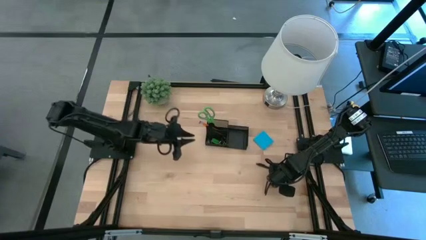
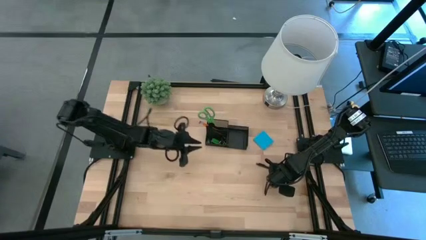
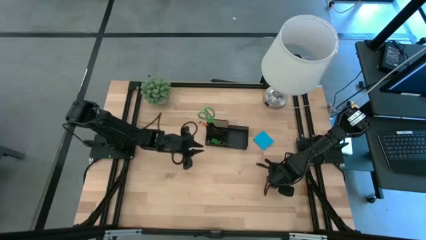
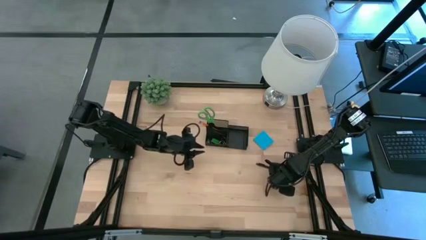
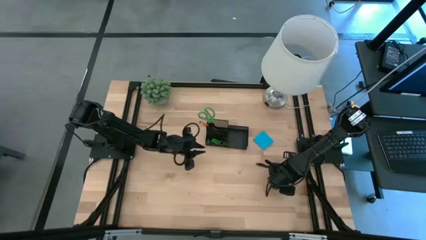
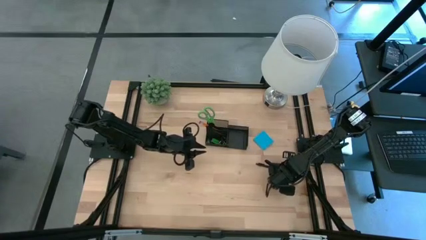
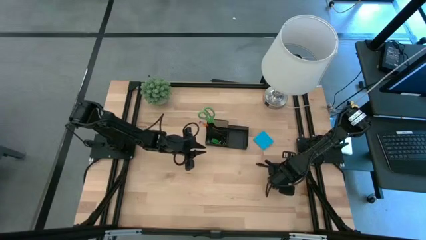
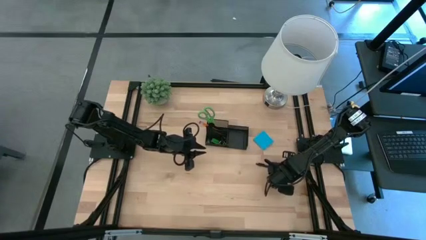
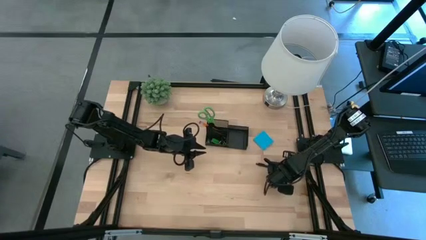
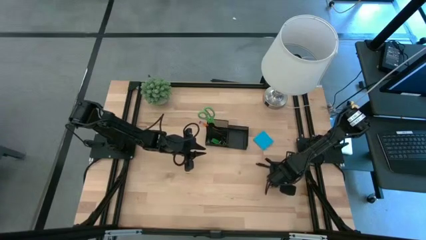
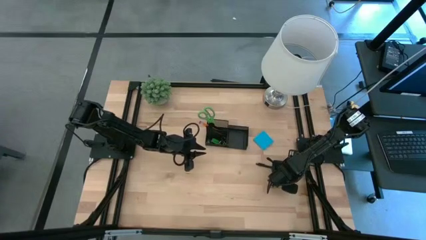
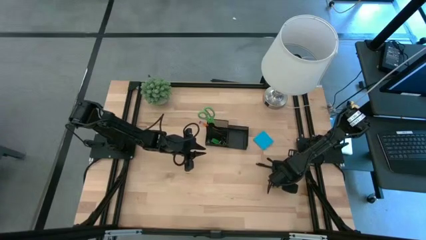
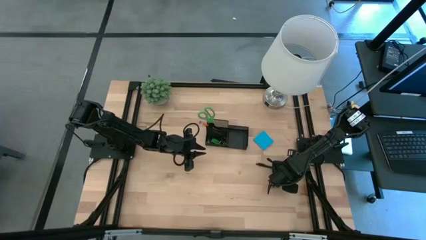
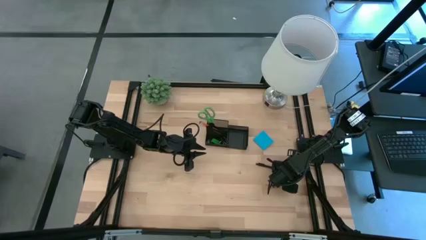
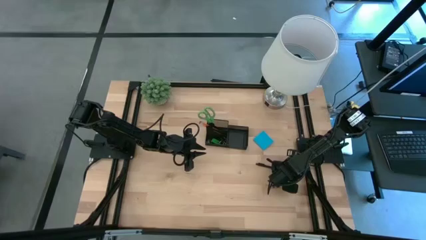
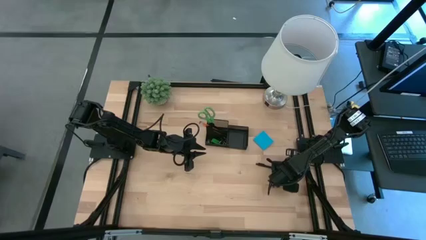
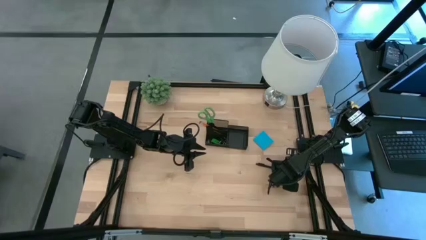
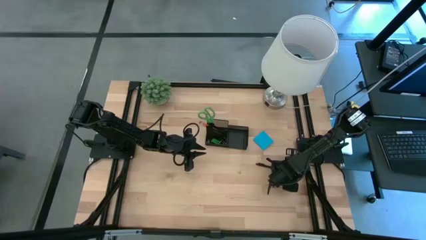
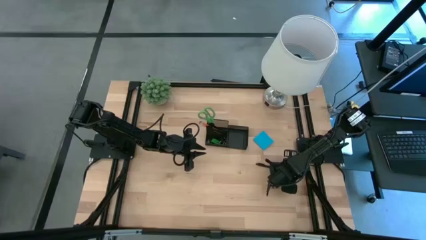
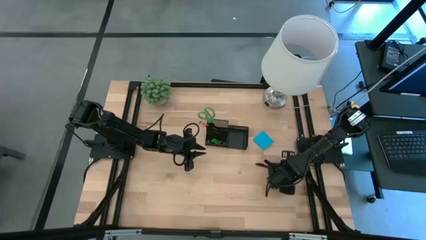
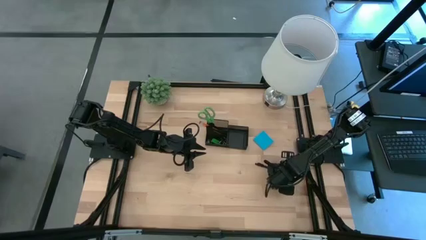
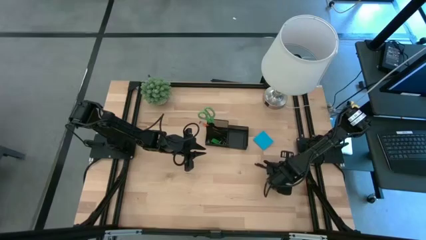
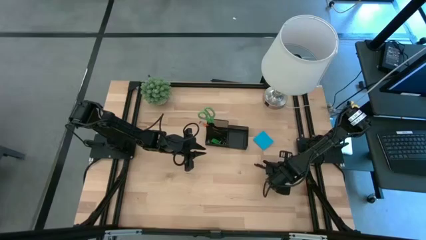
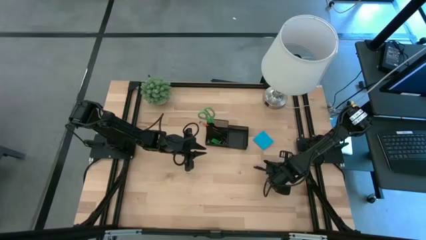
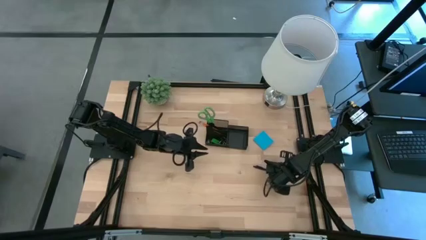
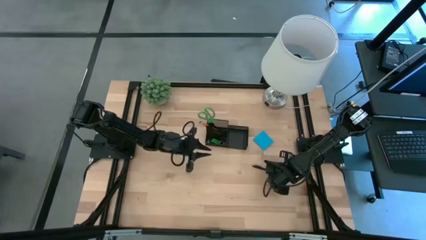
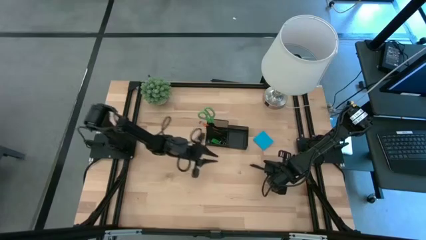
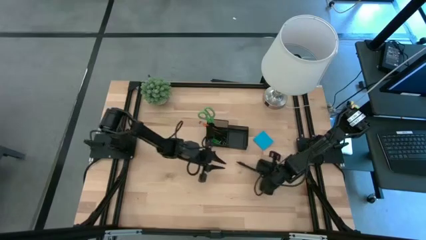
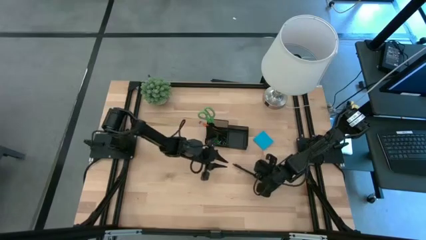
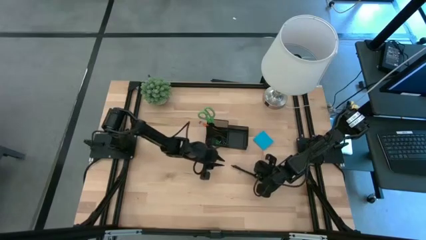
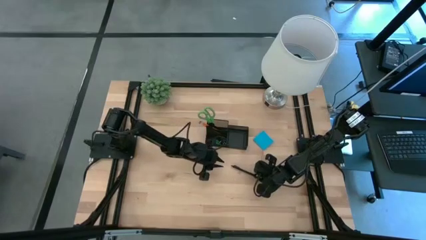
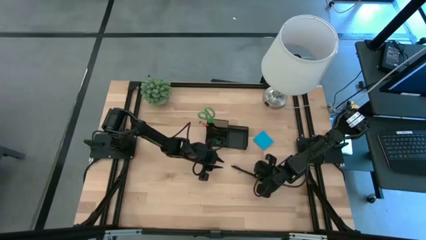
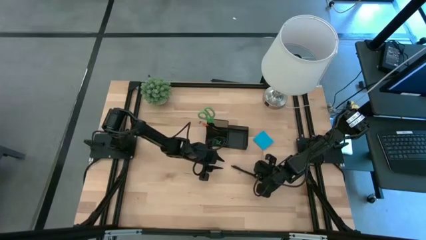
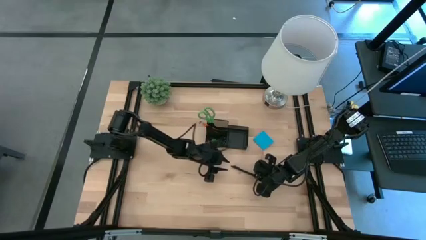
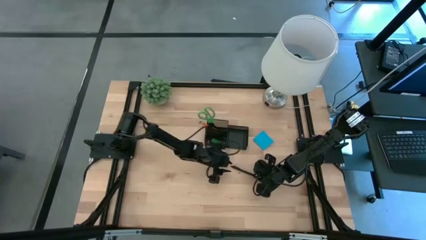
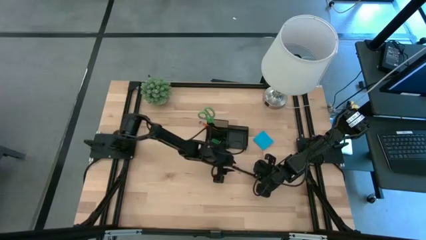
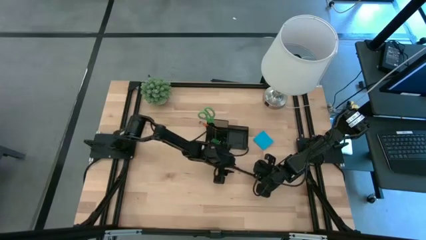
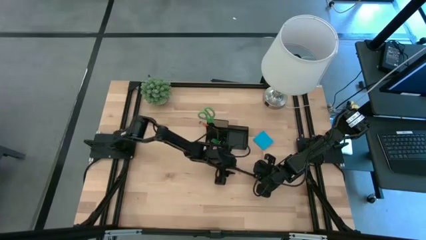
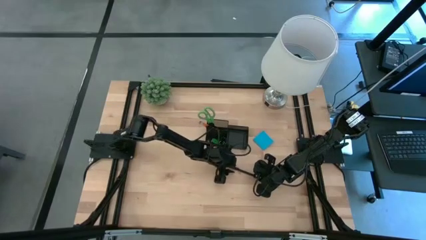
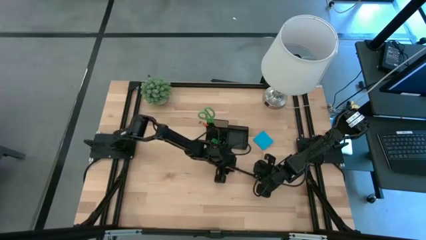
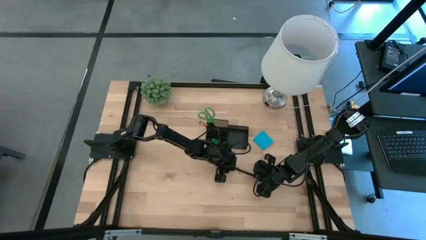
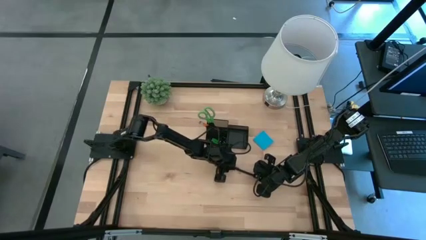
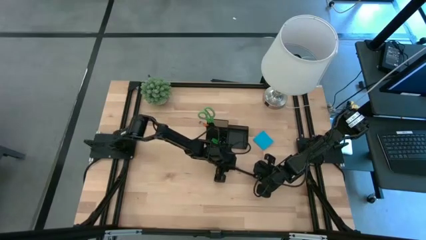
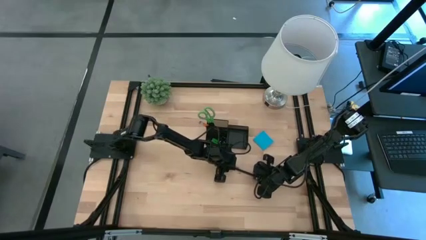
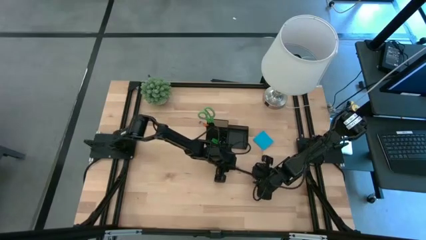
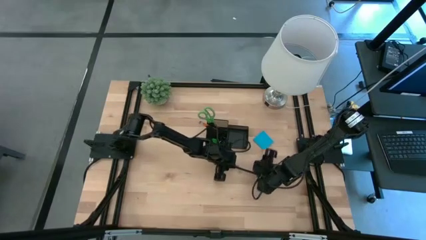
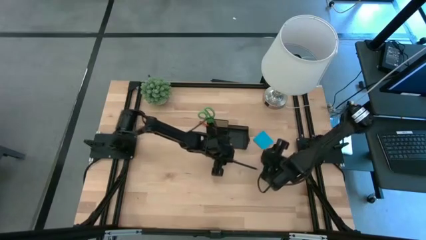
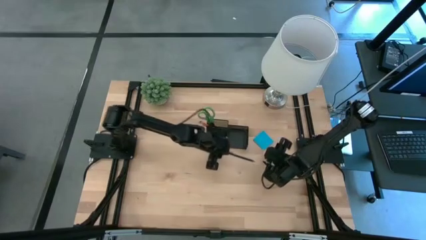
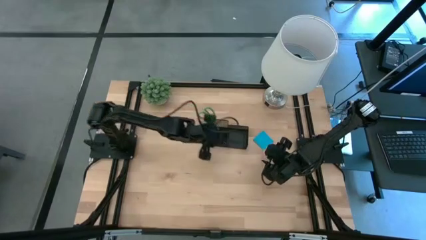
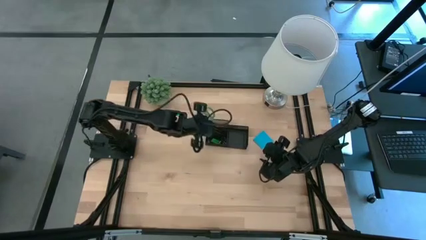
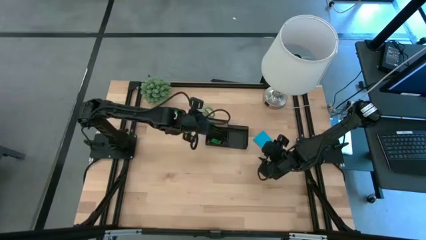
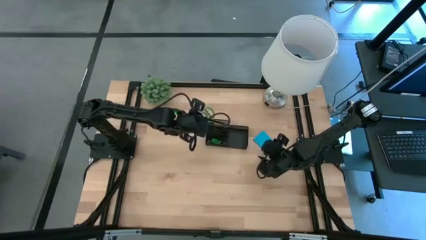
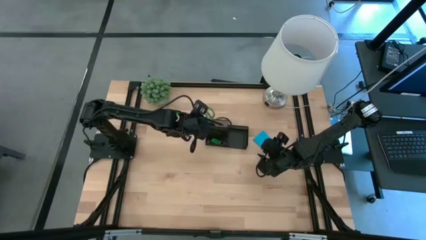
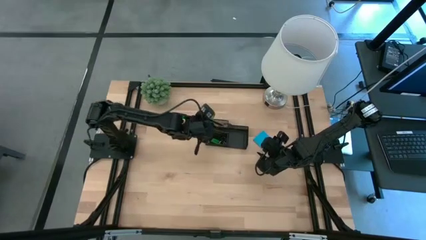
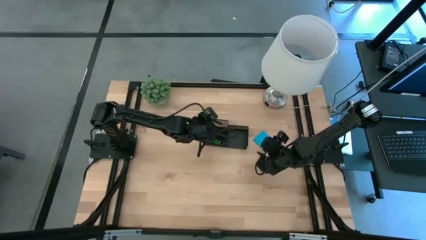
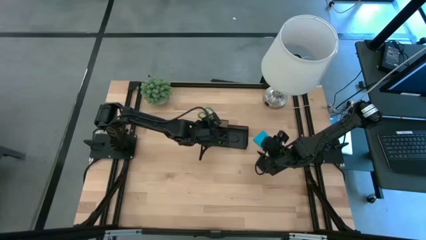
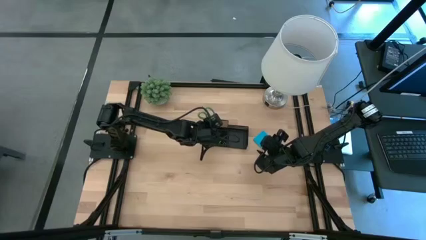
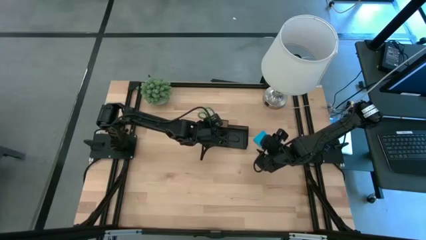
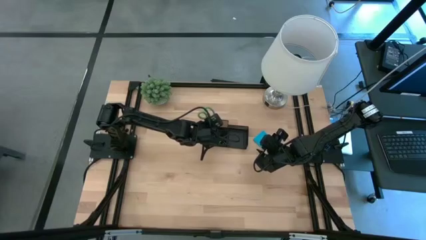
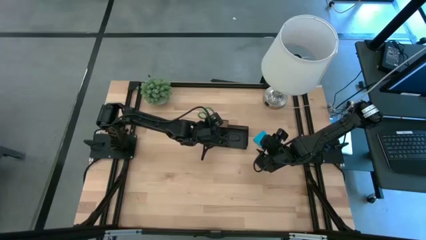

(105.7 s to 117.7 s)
Task: Pick and place office supplies into organizer
Put the black pen into the black organizer

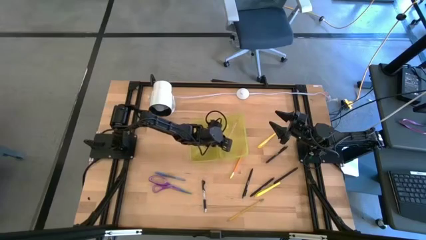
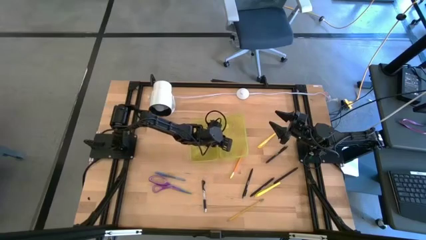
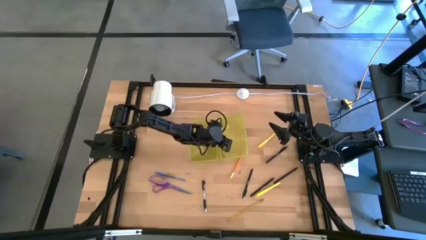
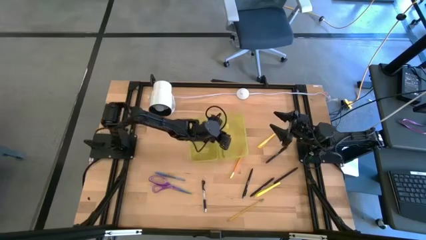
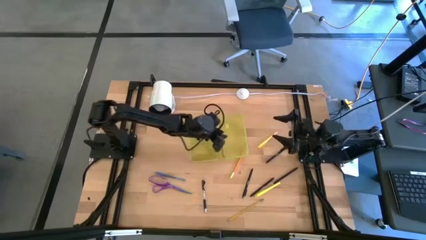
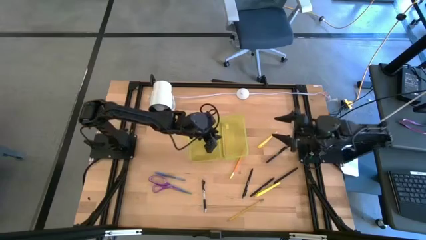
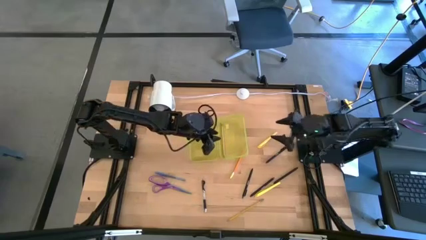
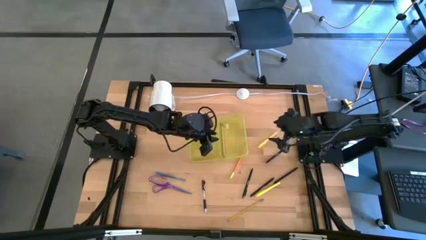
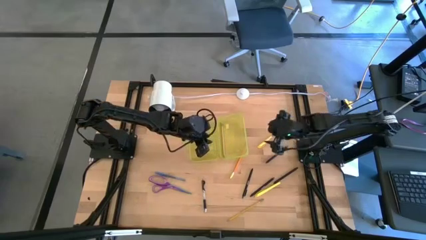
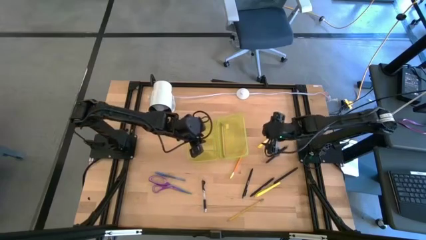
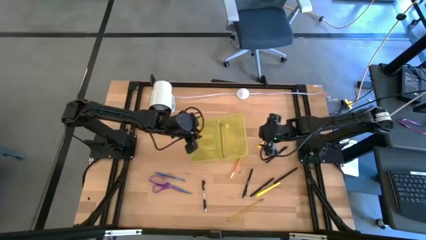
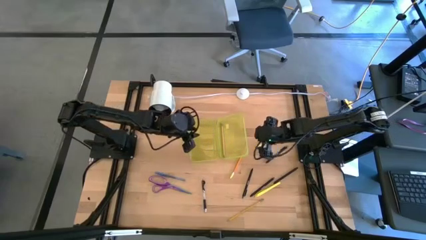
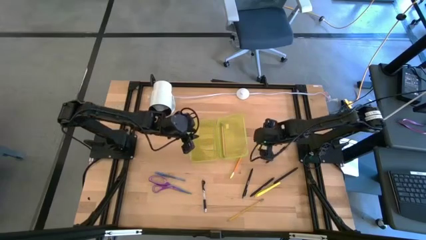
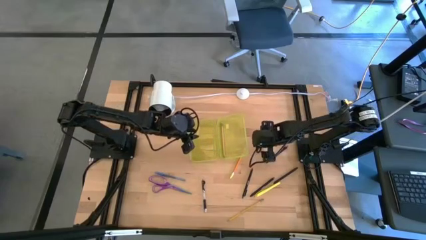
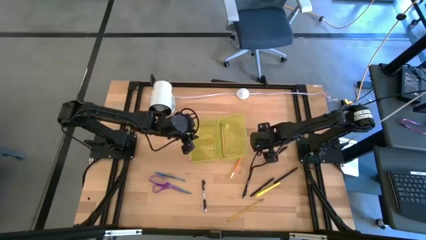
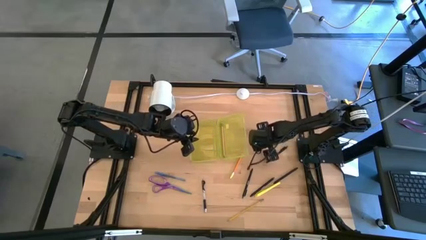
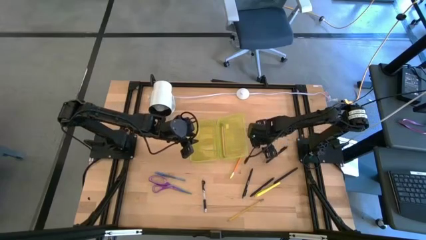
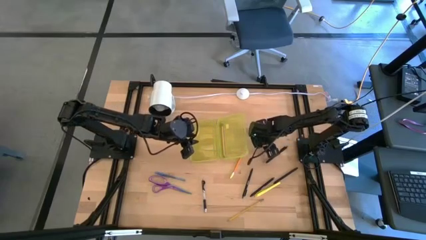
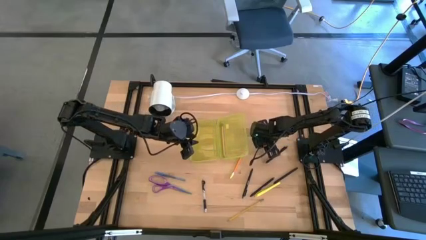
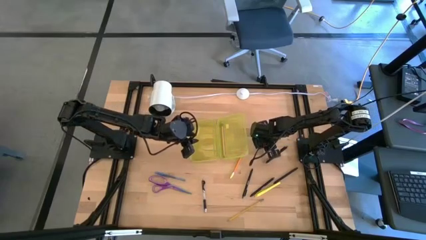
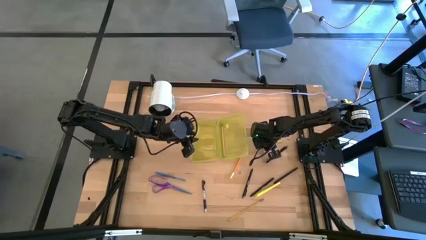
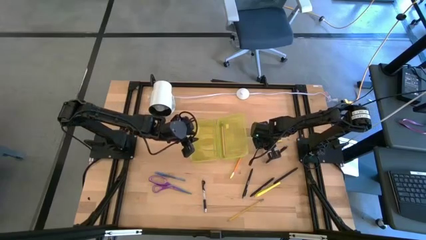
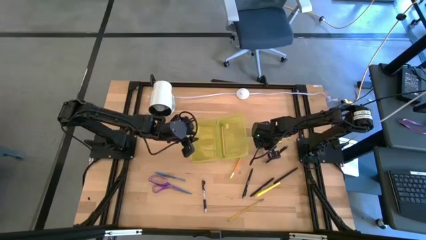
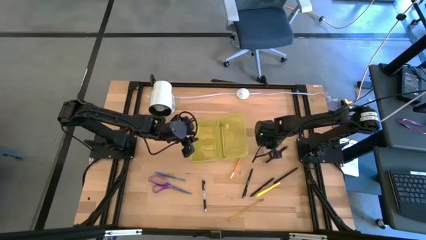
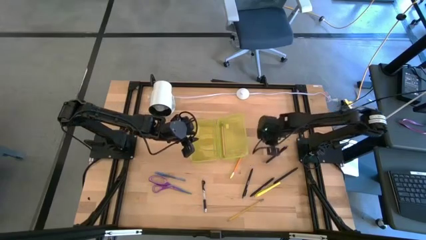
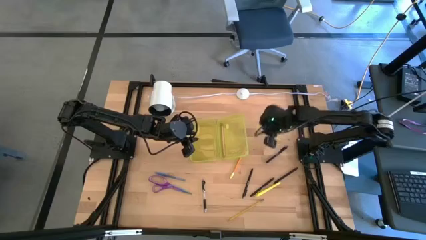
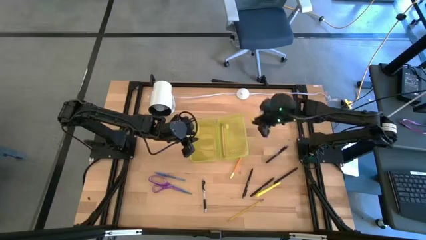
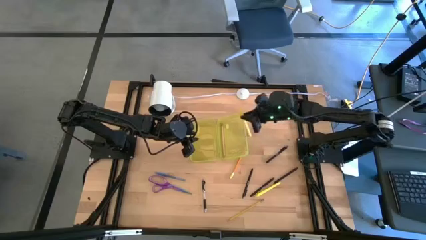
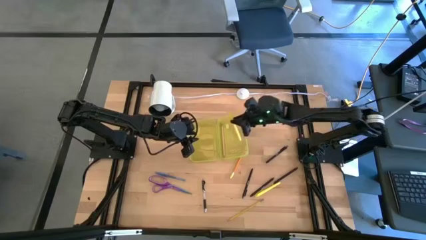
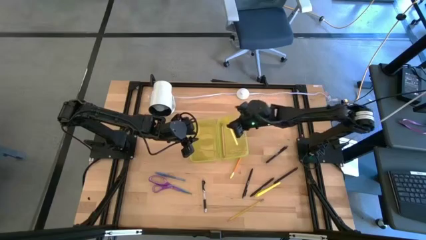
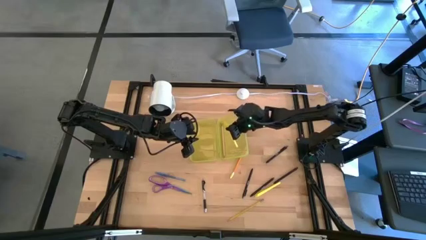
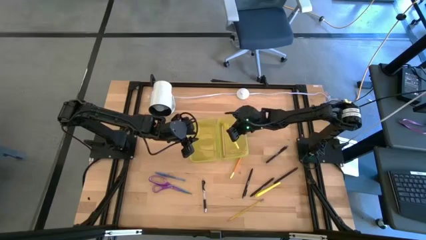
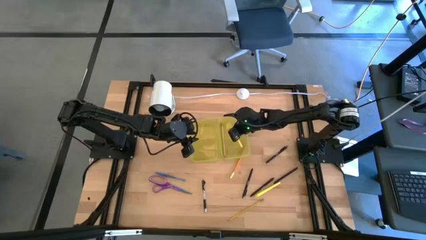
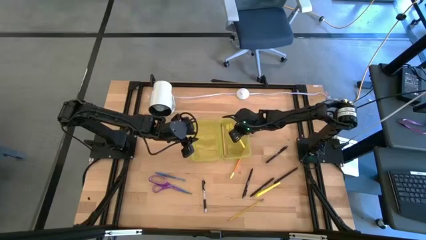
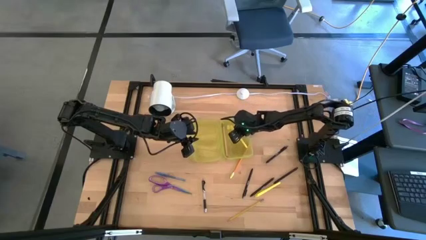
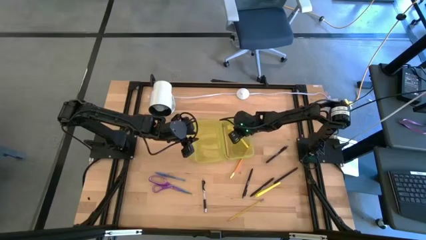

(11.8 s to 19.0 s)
Task: Pick & place school supplies into a supply box
Put the yellow pen into the yellow supply box
